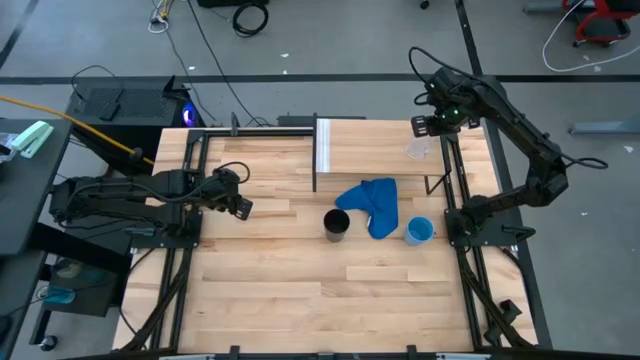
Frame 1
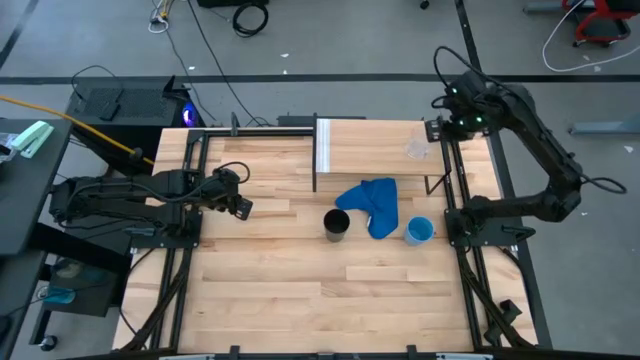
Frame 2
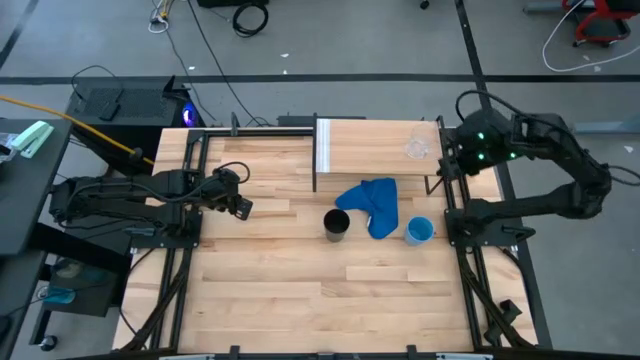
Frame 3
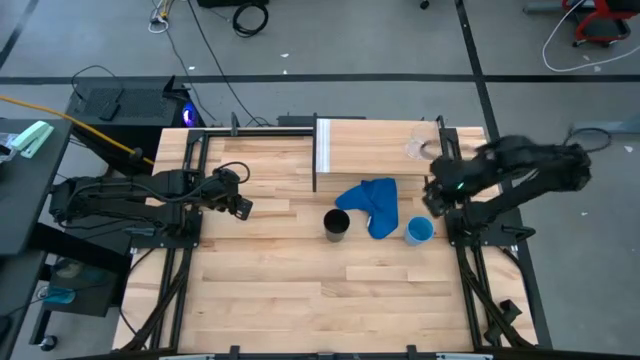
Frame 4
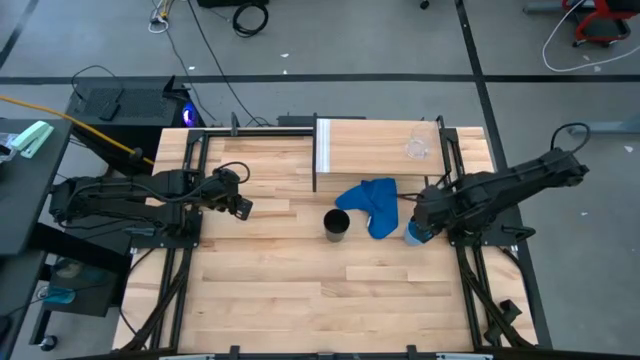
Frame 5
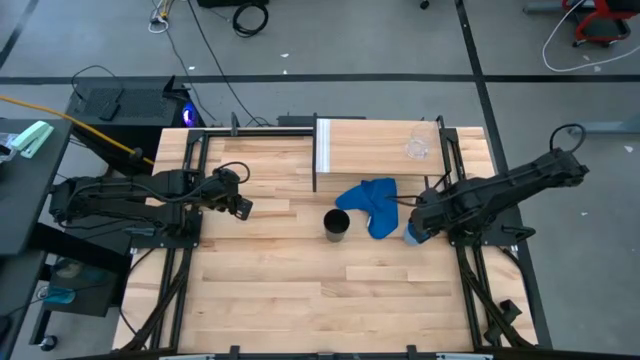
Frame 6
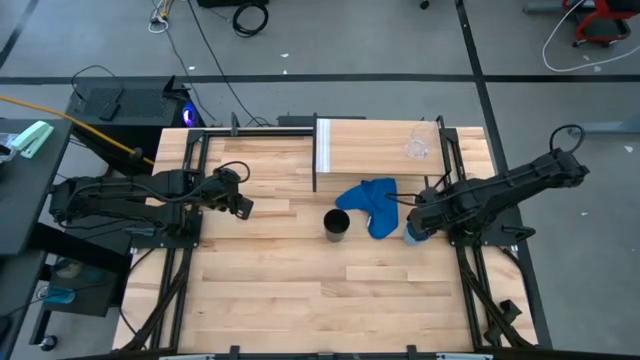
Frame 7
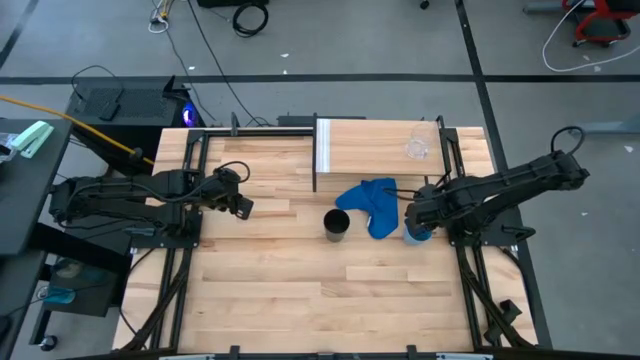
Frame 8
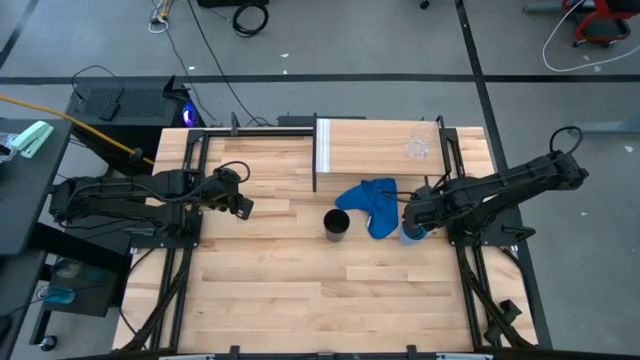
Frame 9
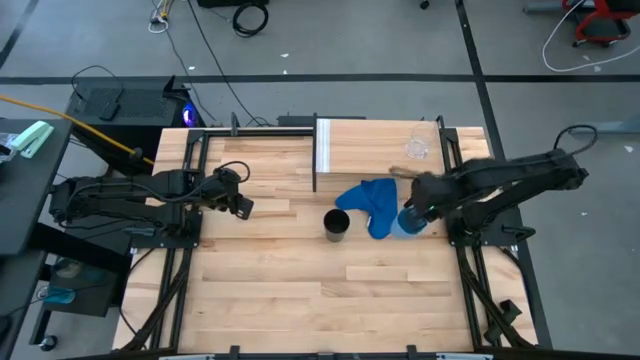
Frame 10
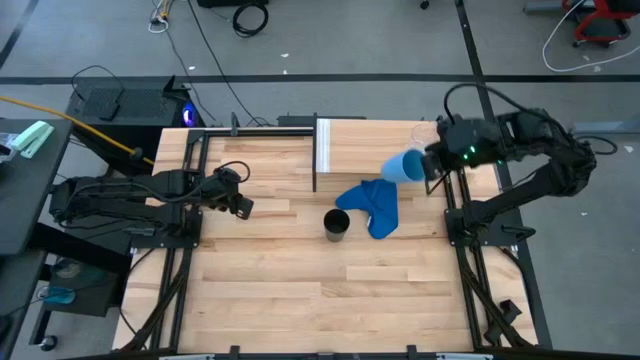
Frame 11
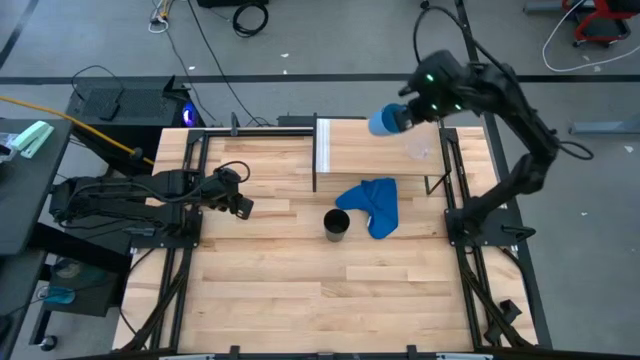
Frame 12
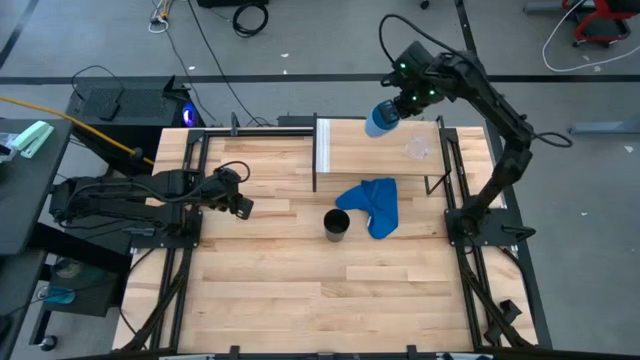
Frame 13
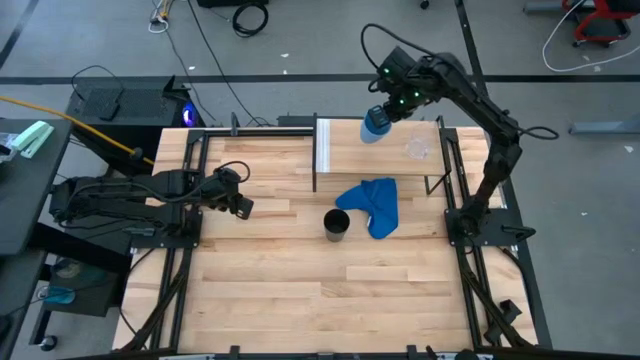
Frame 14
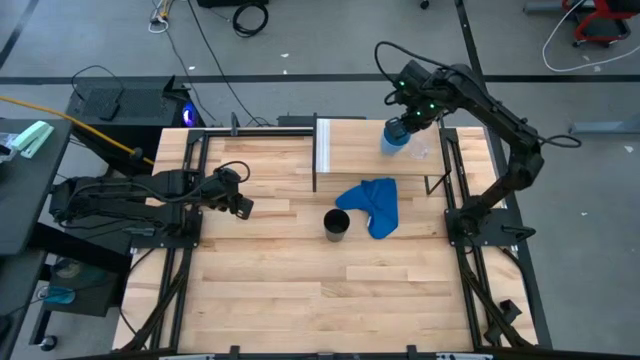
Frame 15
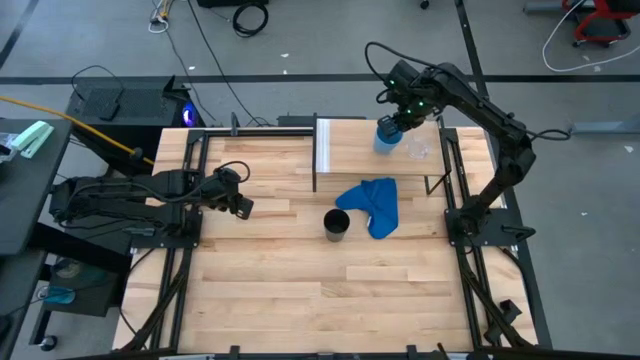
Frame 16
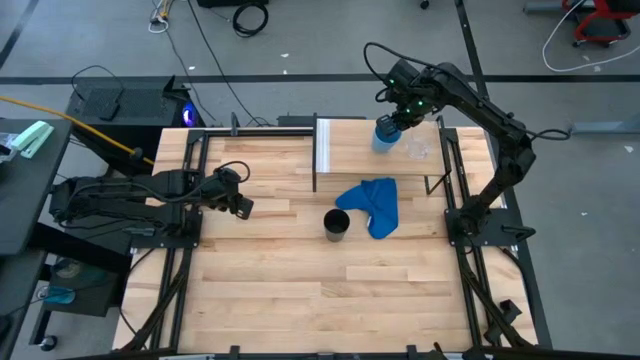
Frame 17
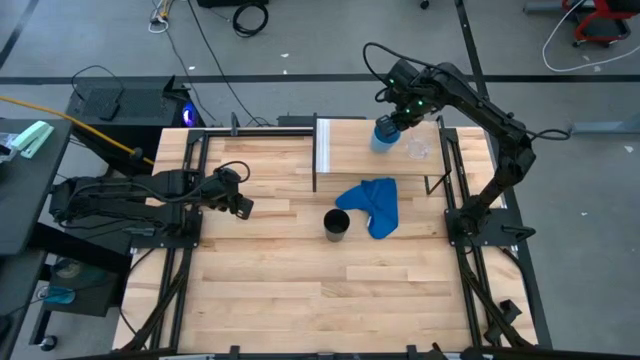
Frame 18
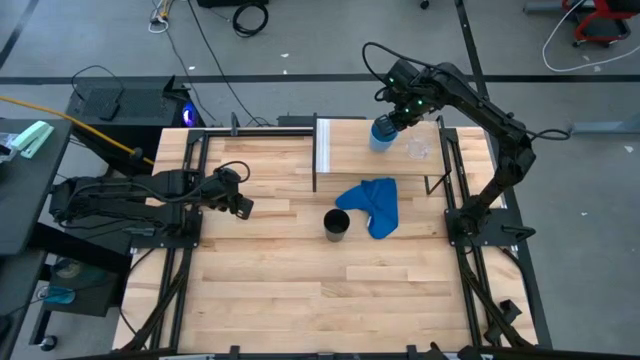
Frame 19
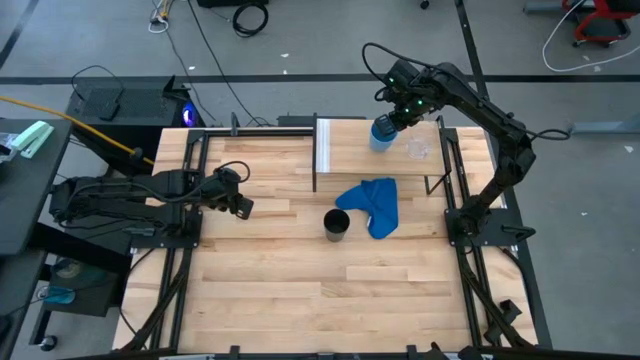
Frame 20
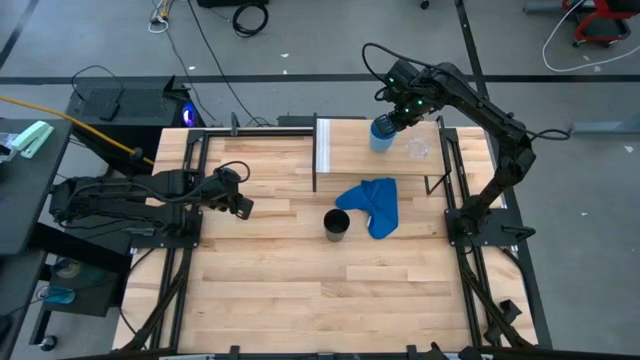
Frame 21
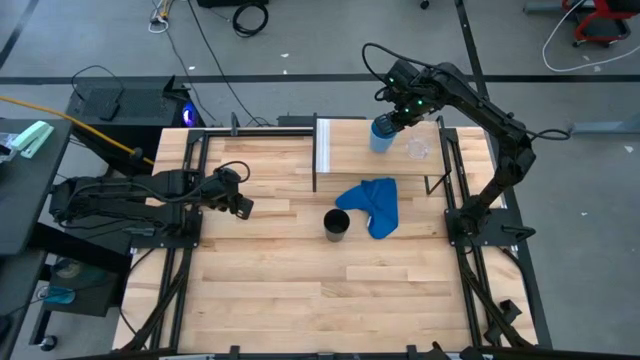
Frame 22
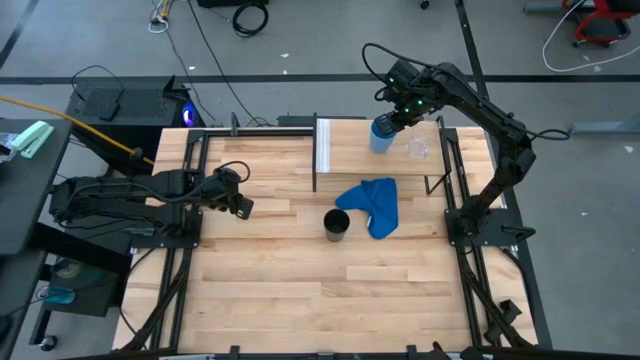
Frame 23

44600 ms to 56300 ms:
Task: Stack small to large cups/mugs on shelf
Put the blue plastic cup on the shelf

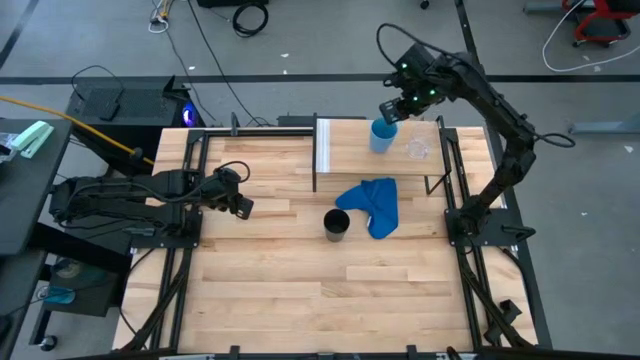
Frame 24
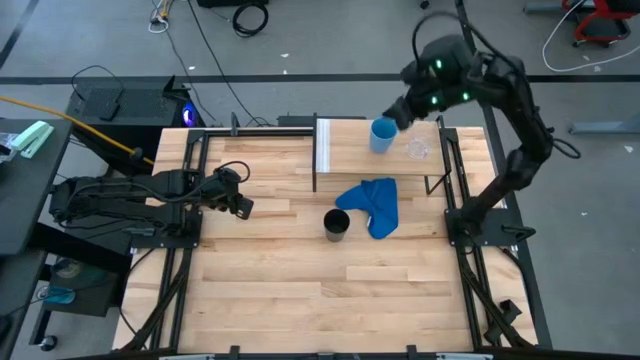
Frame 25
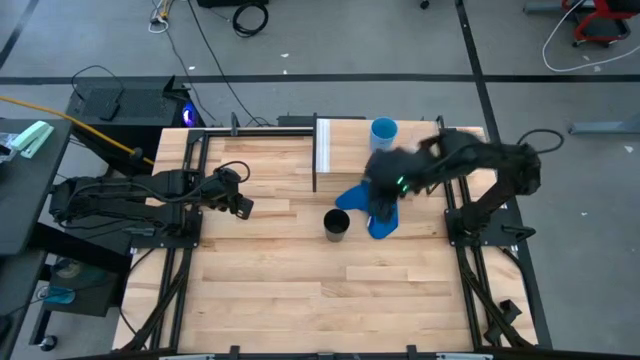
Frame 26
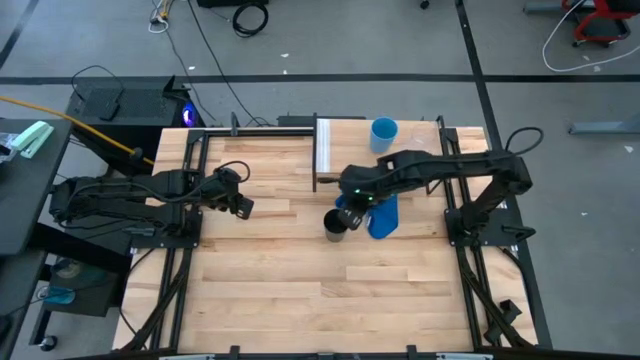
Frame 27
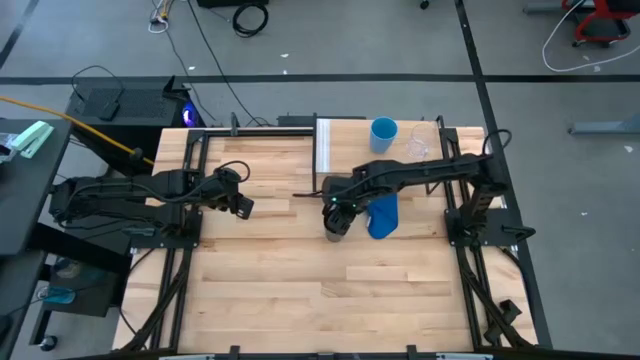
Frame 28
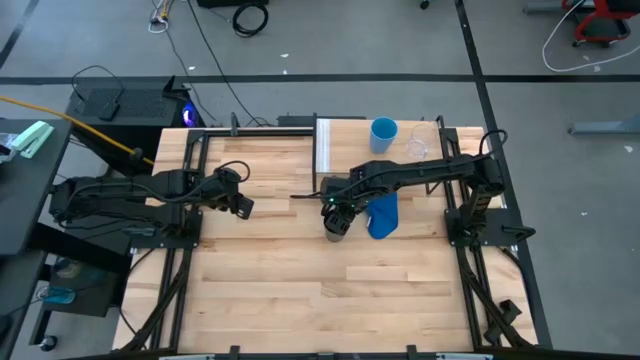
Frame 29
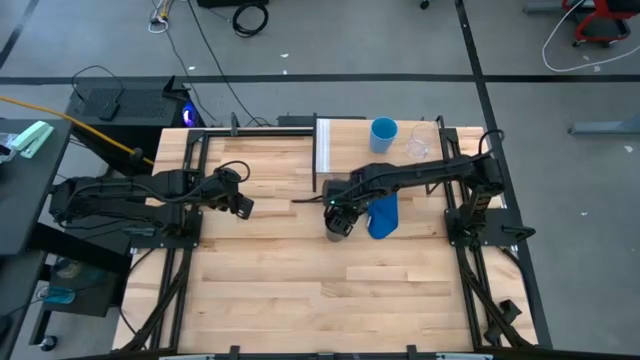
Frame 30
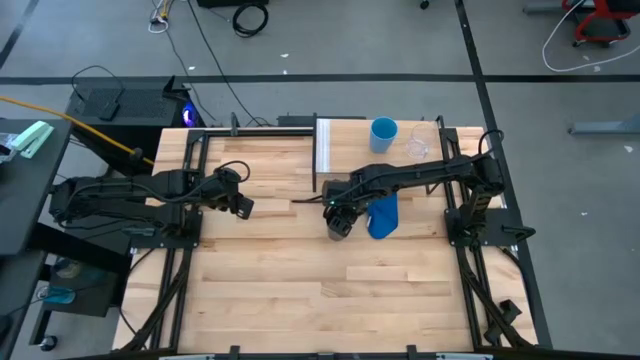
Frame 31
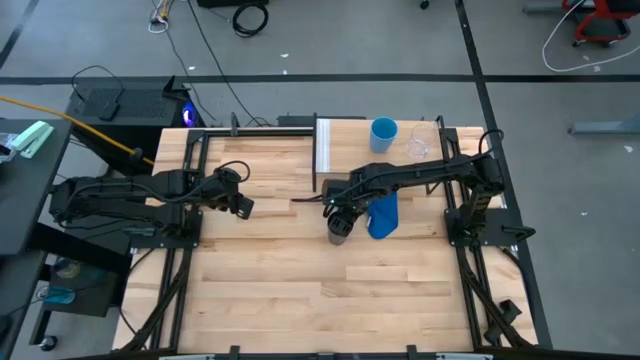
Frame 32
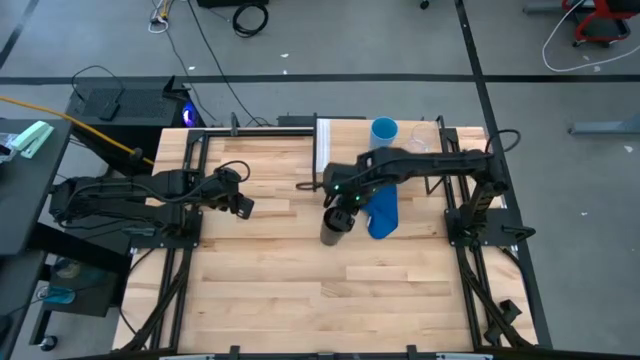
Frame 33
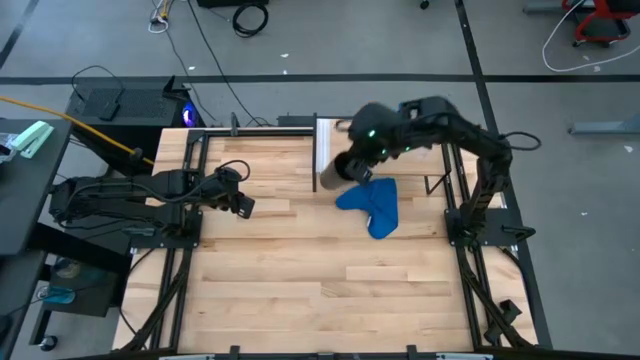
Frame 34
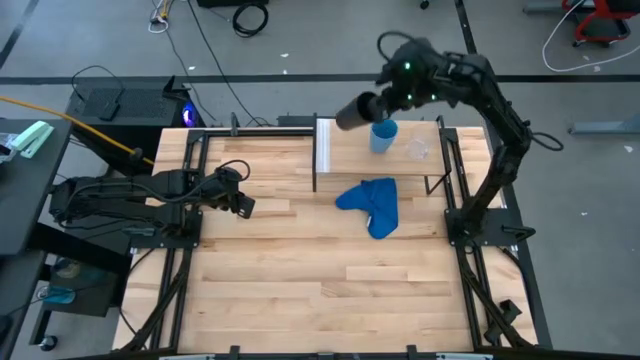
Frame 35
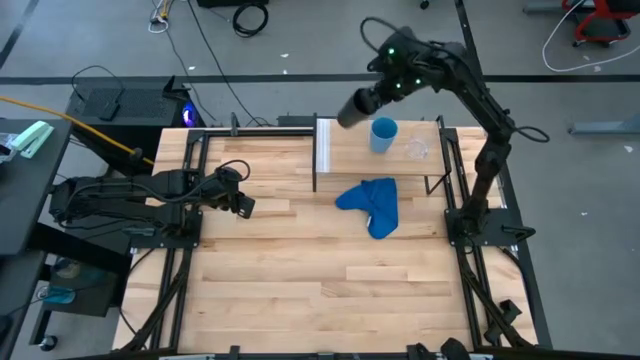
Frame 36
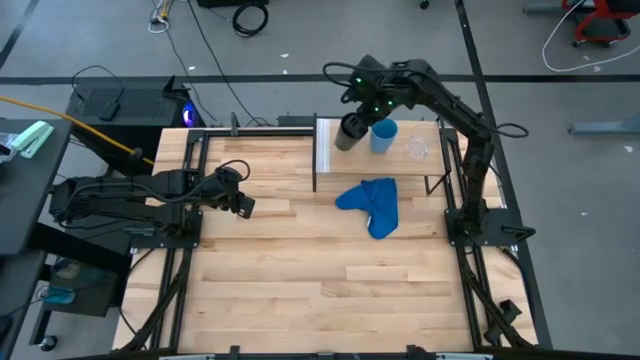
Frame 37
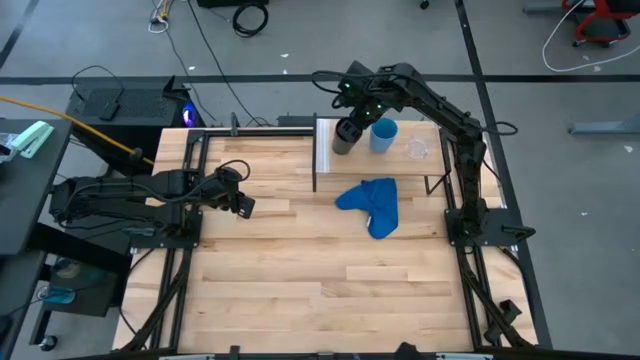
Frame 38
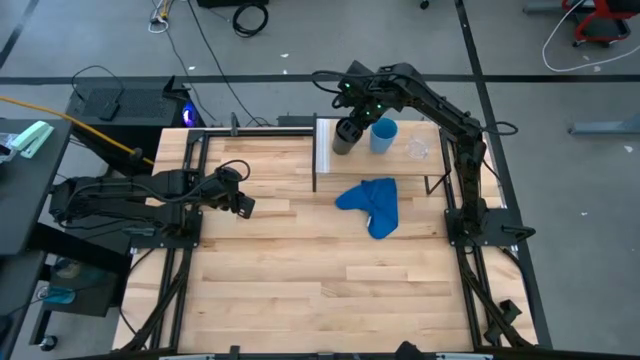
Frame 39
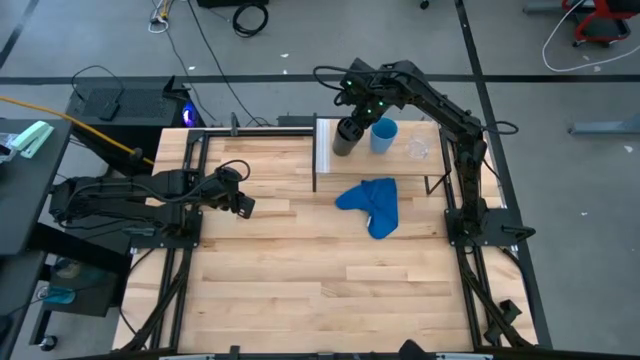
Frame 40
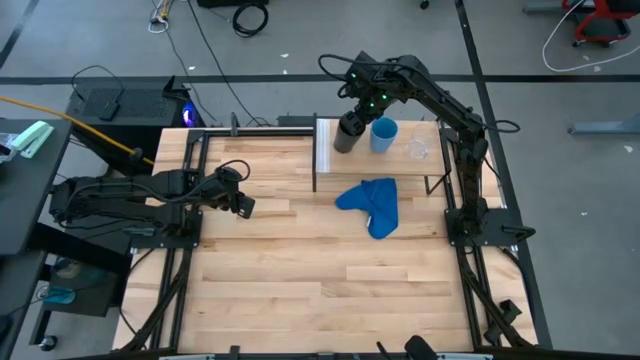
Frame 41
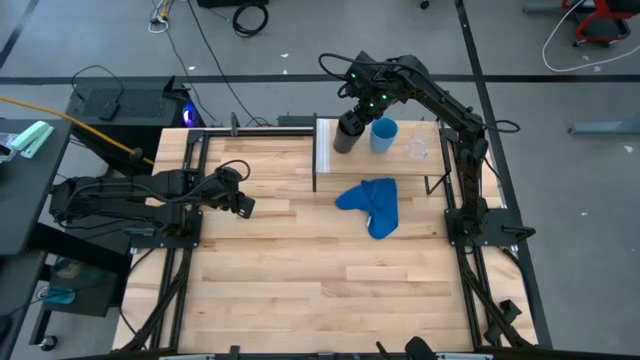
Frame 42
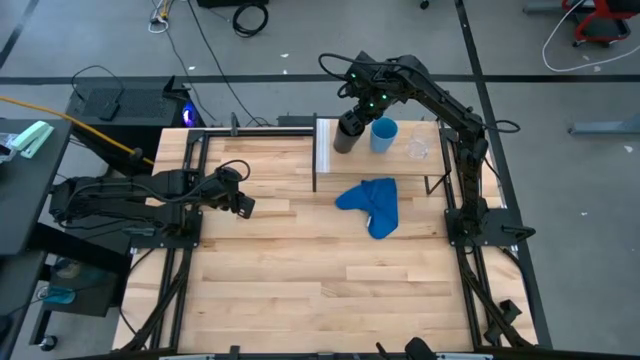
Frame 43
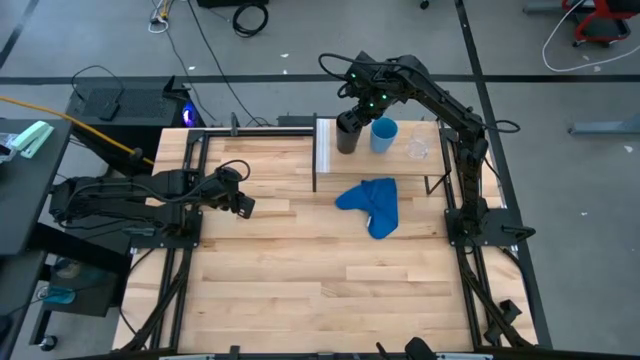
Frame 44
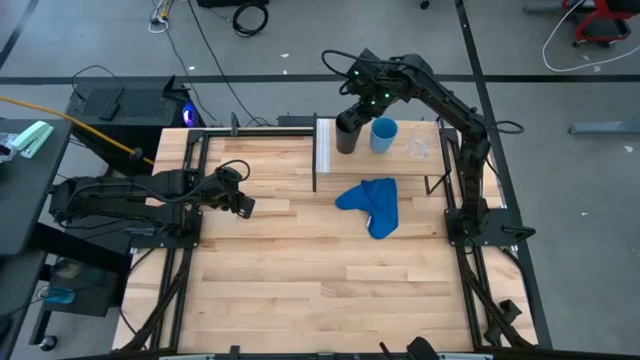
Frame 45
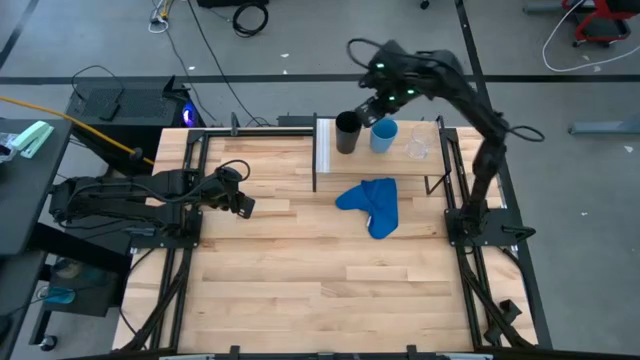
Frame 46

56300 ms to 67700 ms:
Put the black plastic cup on the shelf
